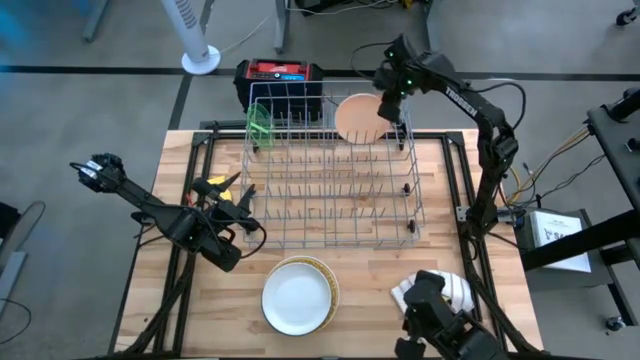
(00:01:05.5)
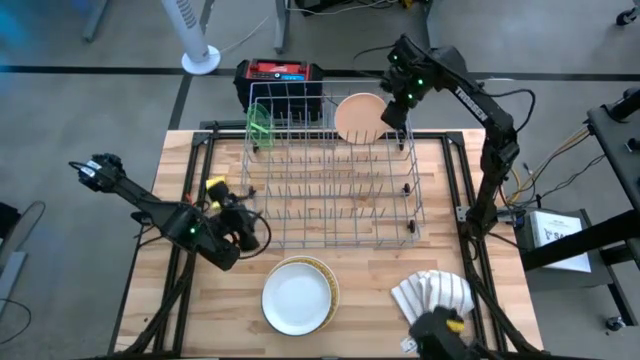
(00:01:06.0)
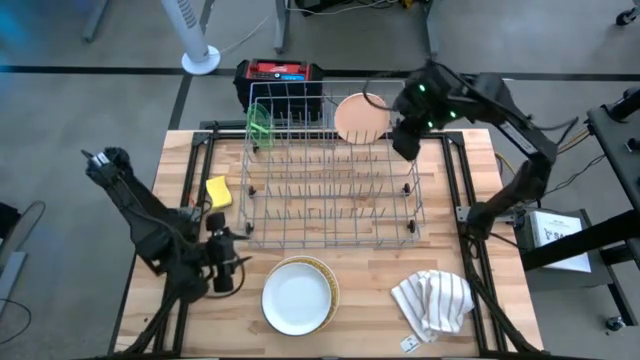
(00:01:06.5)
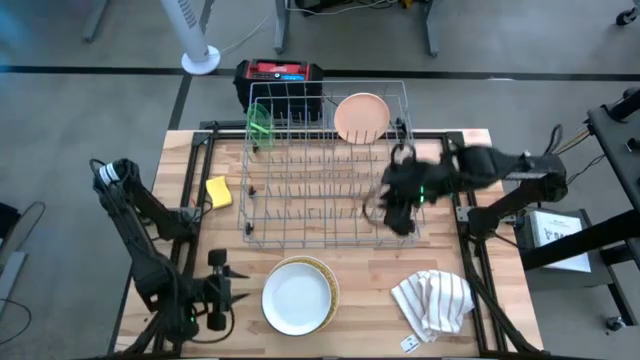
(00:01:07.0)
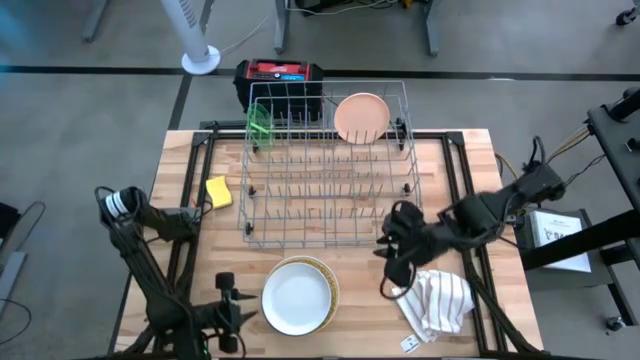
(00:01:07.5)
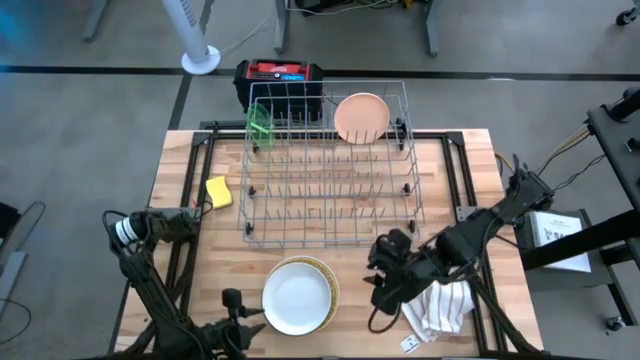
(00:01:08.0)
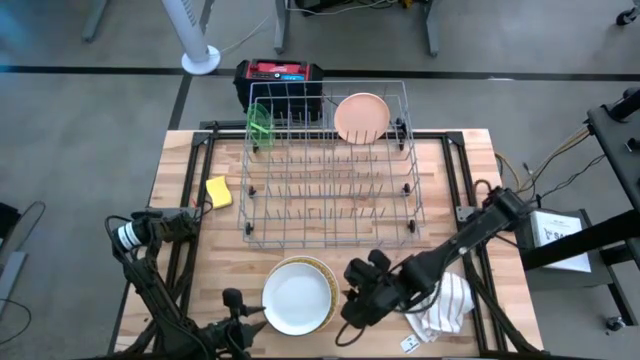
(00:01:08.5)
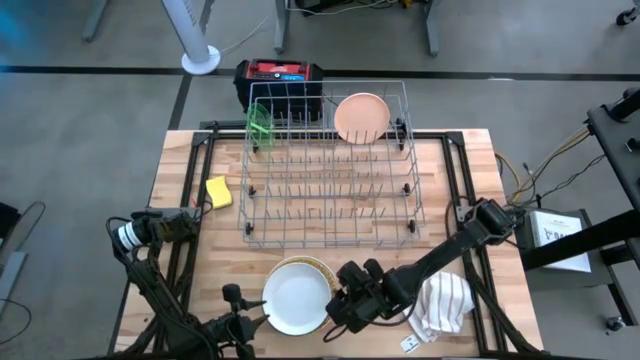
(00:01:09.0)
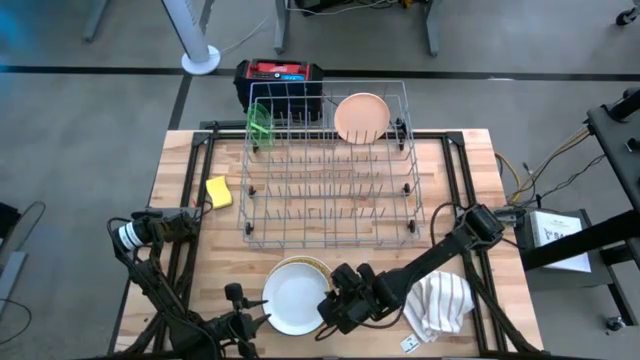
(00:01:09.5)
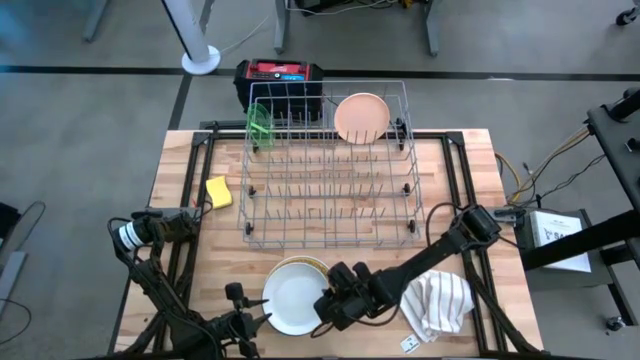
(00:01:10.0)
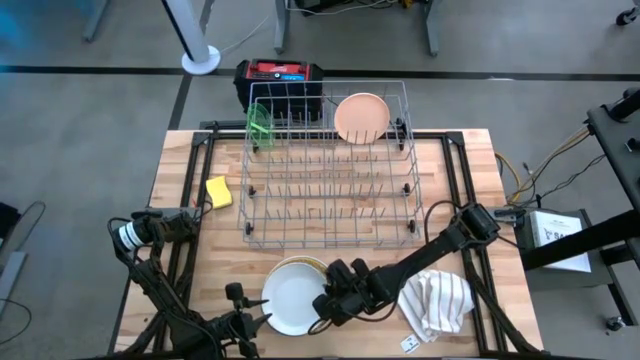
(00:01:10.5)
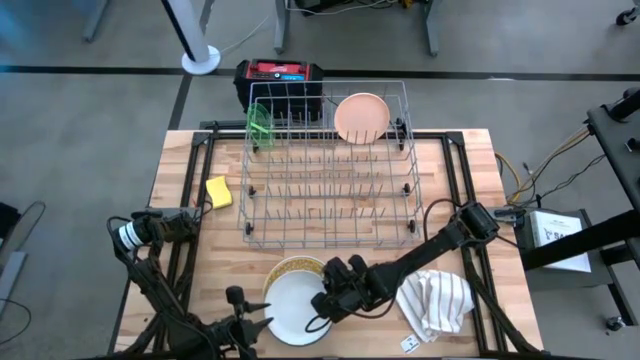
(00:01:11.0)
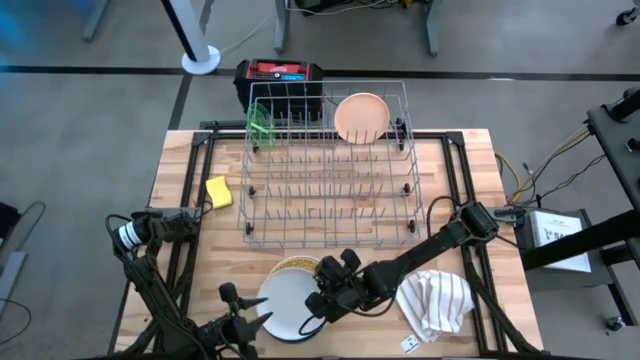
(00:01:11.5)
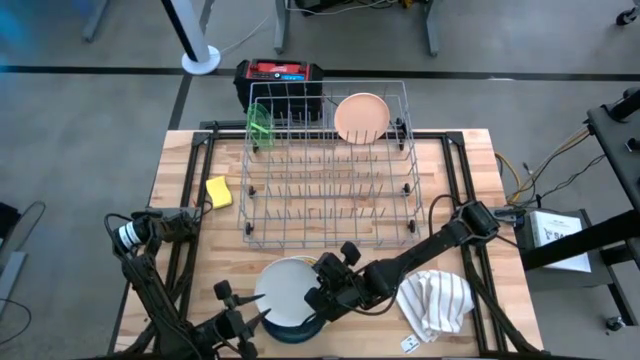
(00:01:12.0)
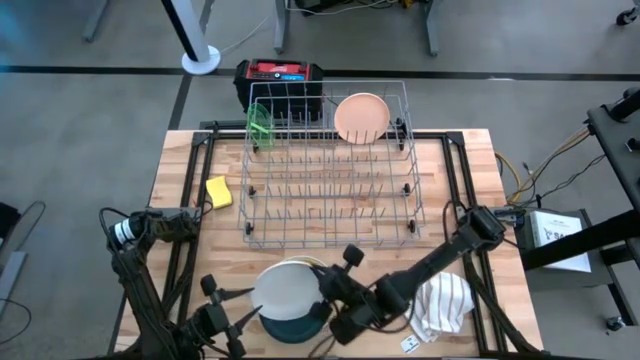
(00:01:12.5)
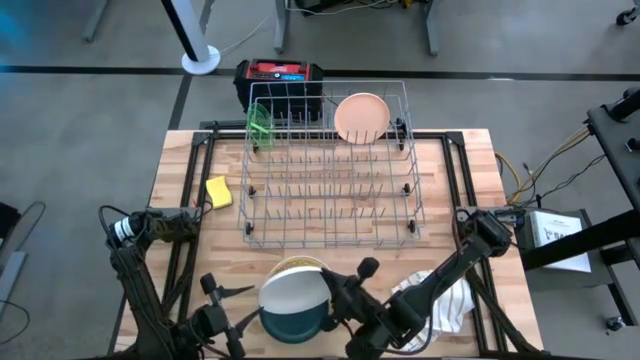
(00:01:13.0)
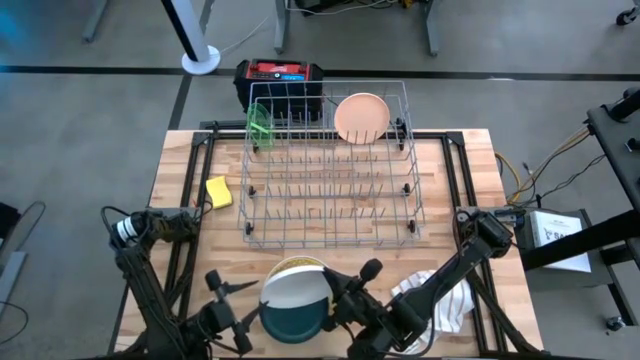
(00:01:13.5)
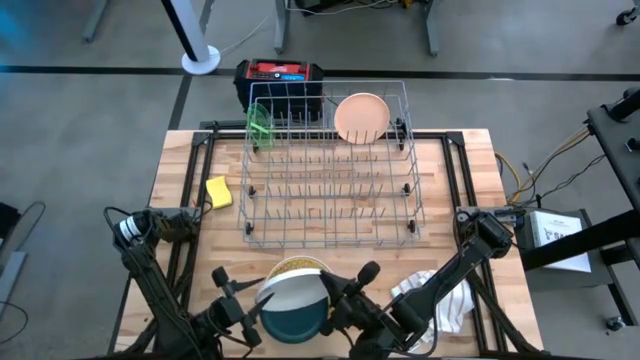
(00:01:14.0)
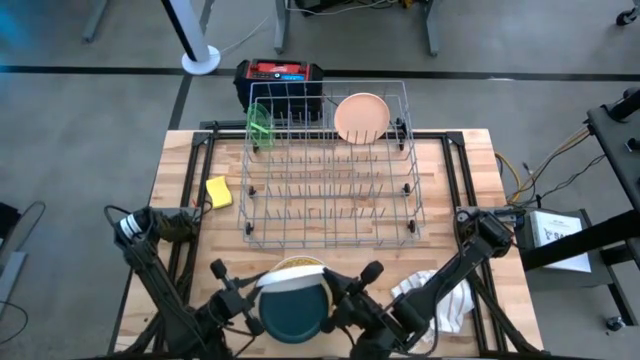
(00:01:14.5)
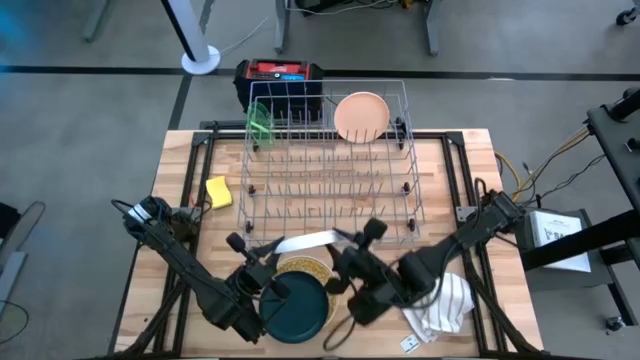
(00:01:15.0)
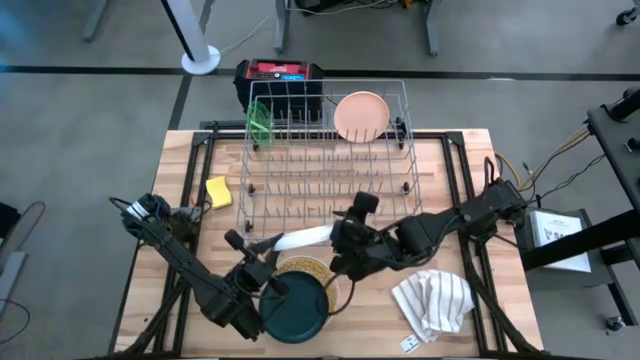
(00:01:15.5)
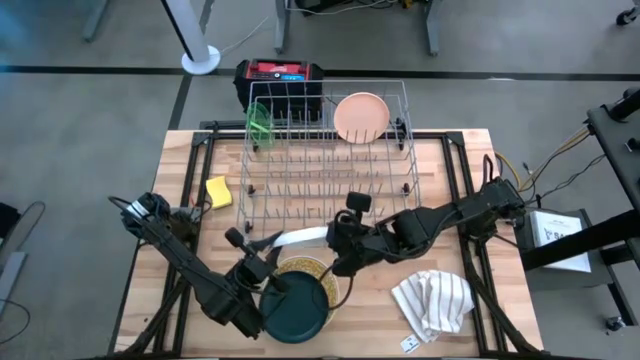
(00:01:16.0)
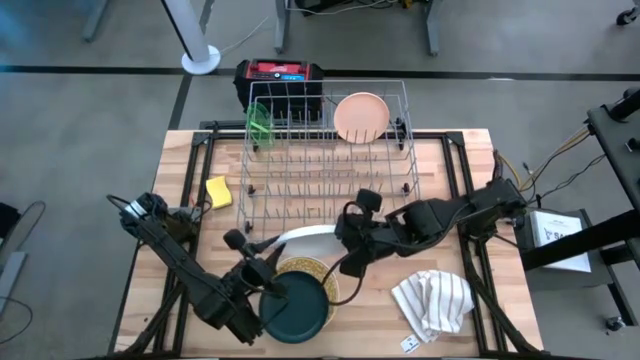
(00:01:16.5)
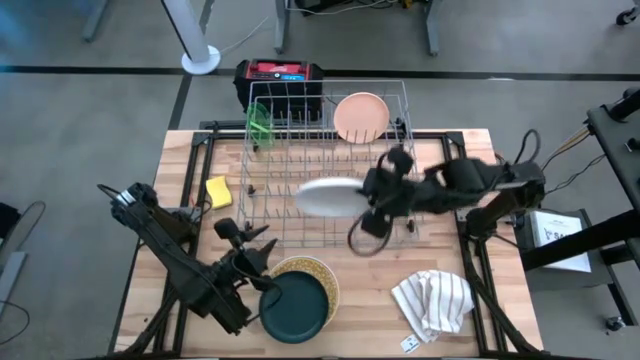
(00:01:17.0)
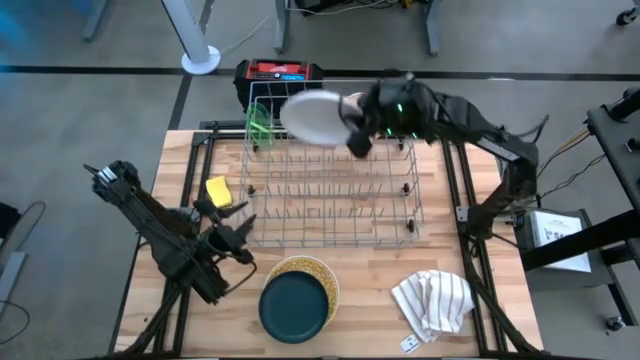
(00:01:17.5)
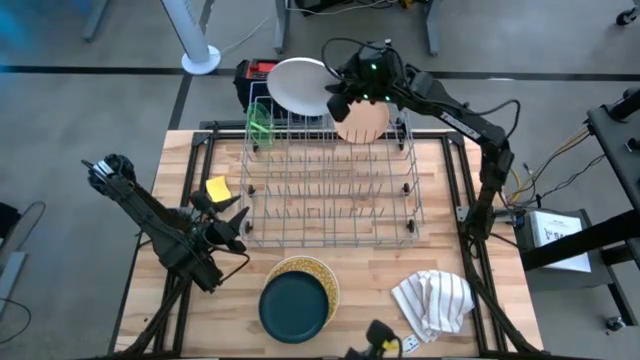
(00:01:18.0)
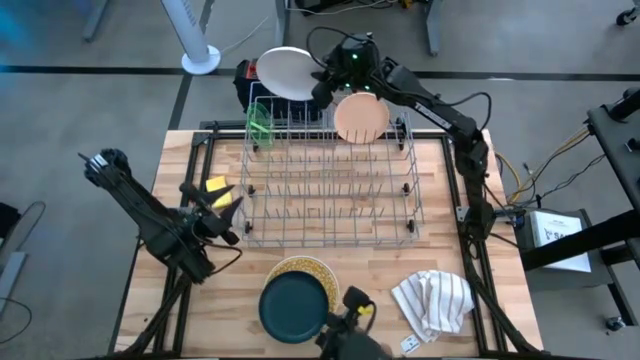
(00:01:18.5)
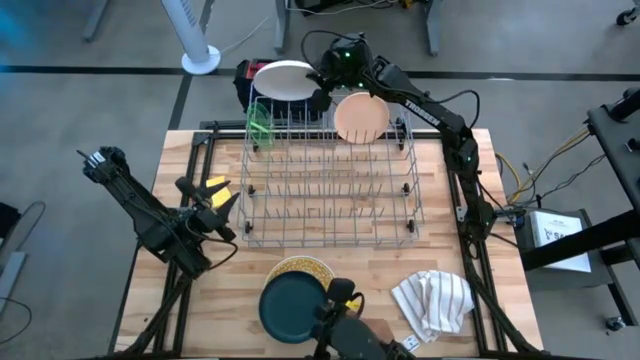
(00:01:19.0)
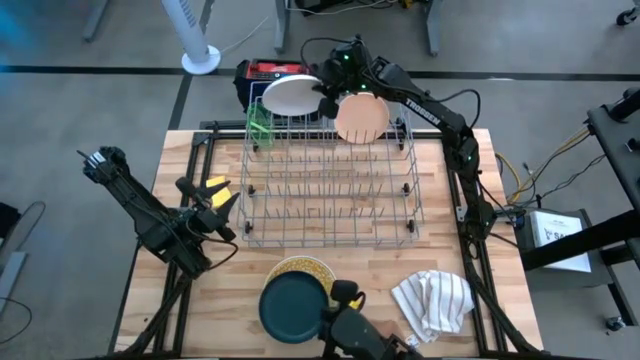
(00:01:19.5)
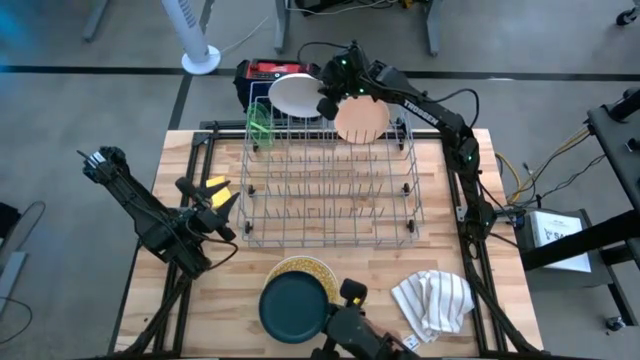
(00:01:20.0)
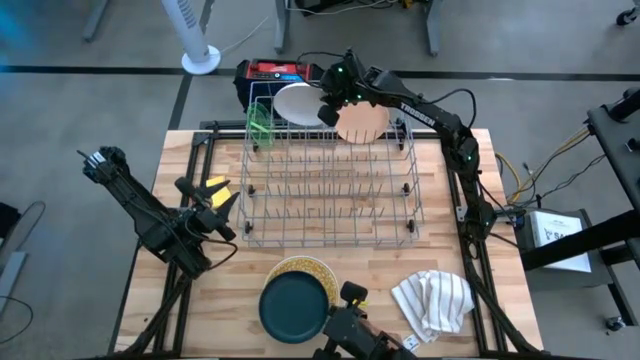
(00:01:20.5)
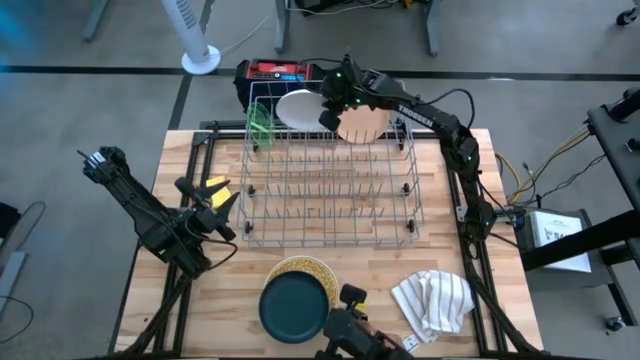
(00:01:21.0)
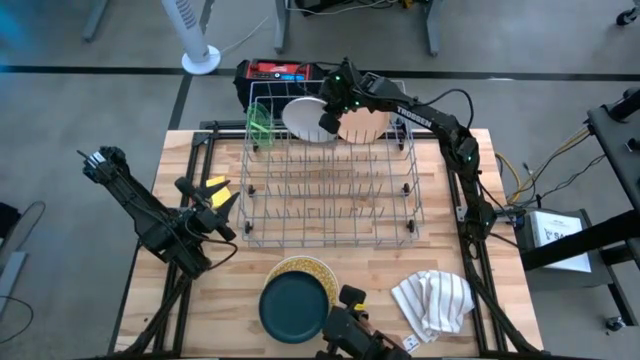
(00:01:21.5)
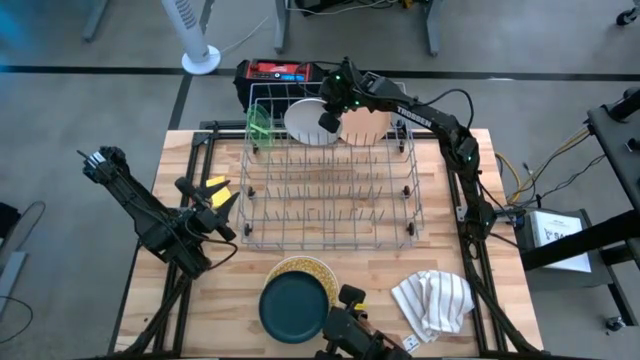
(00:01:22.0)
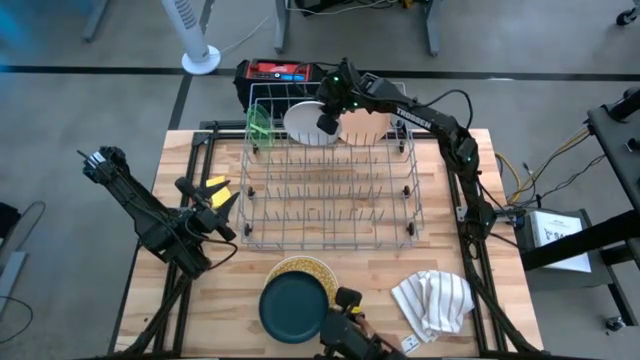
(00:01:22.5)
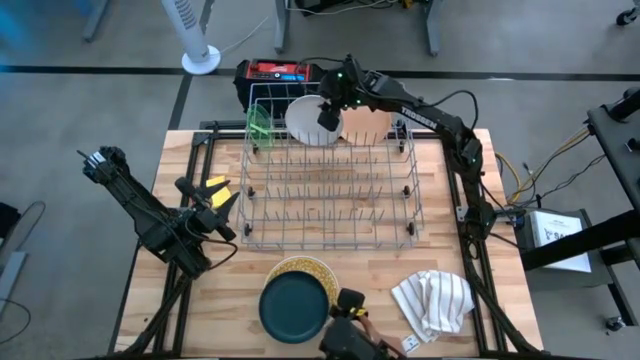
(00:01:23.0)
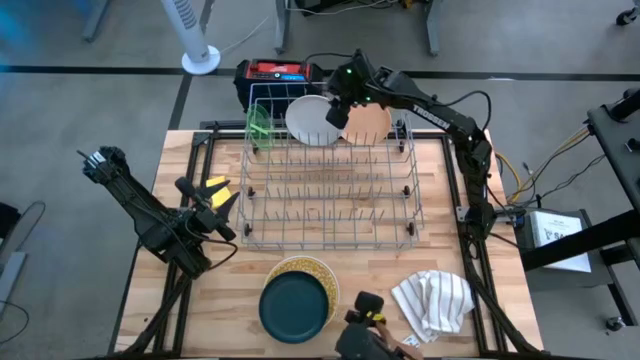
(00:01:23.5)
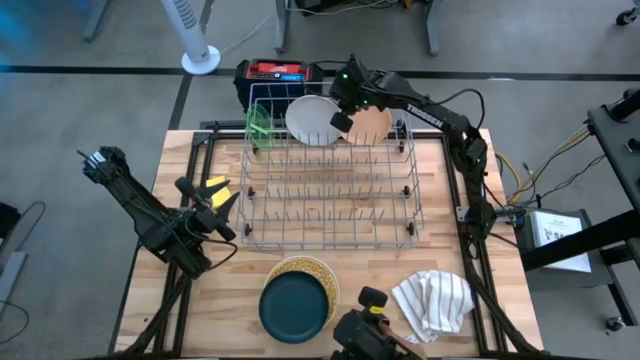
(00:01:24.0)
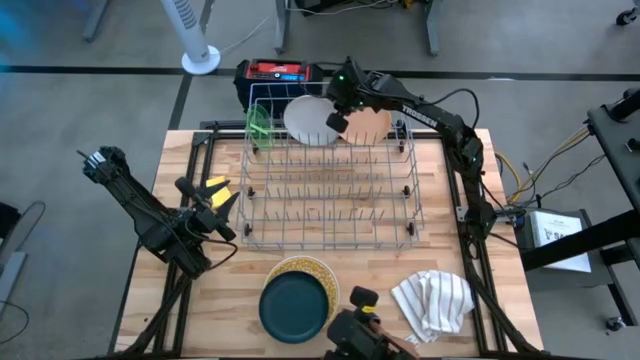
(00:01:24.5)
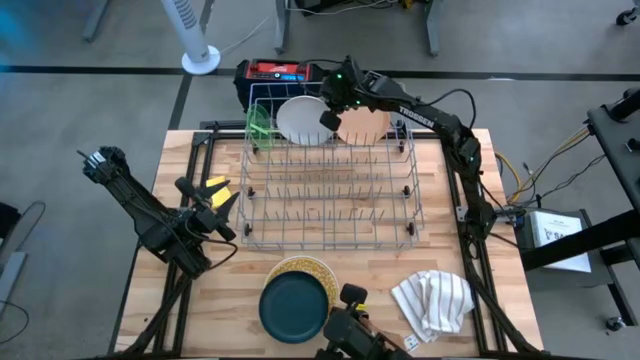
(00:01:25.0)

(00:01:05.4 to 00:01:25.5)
Task: Sort dishes
Put the gray plate into the dish rack

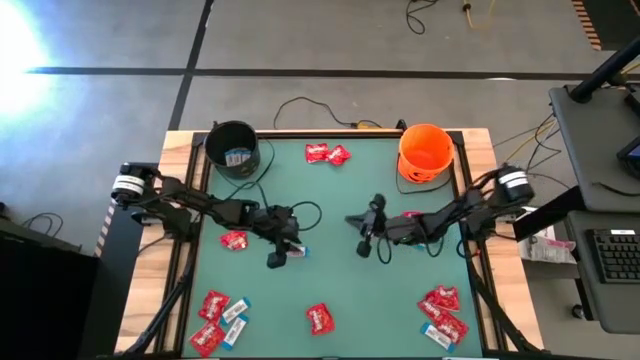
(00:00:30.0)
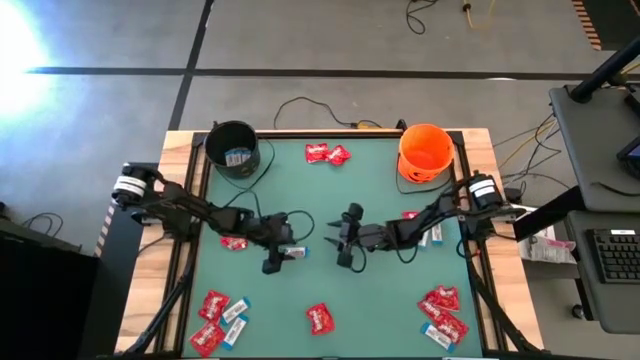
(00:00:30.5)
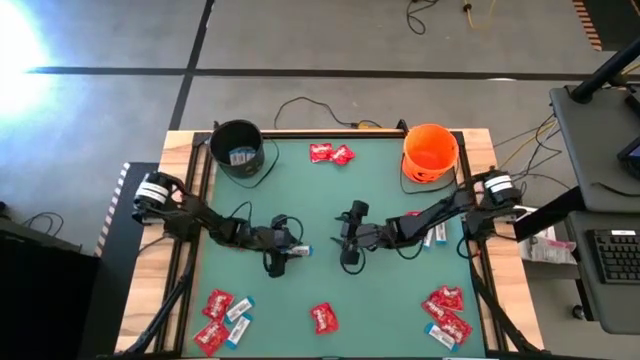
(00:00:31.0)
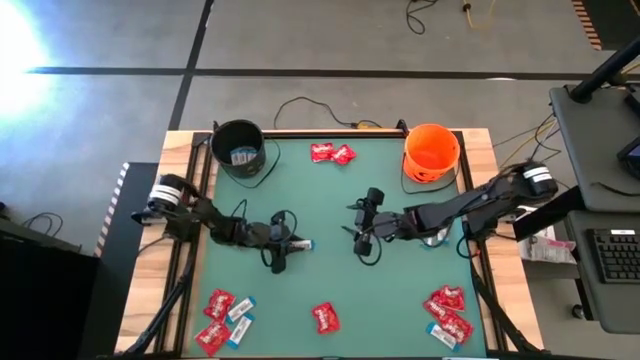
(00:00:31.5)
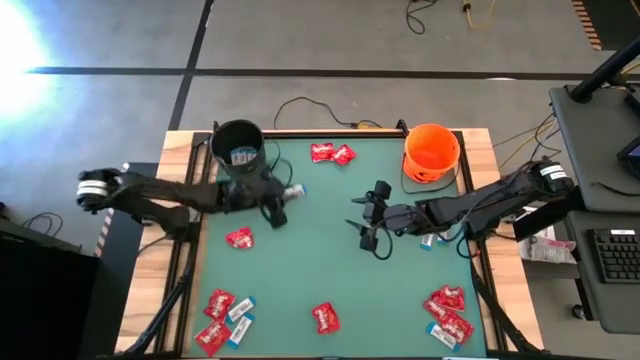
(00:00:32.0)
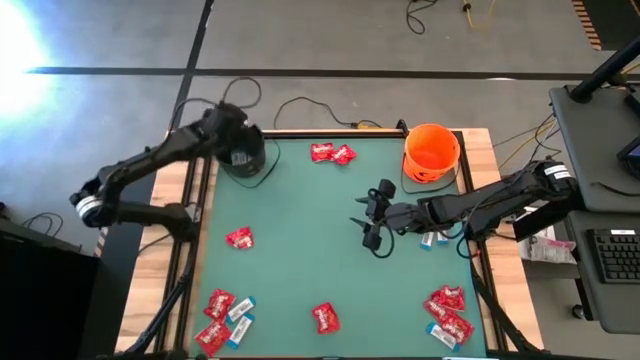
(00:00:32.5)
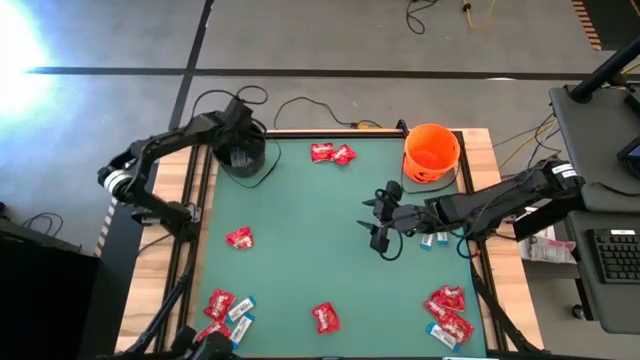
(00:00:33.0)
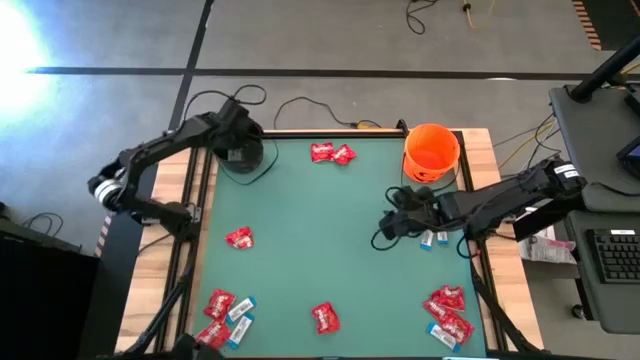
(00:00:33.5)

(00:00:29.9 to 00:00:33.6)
Task: Sort candy by brand, put in halloween buckets
Put the white chocolate into the black bucket
